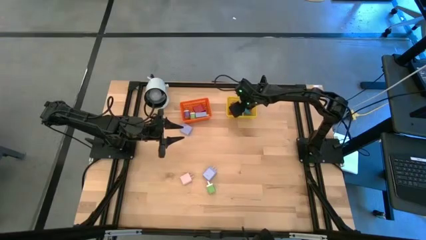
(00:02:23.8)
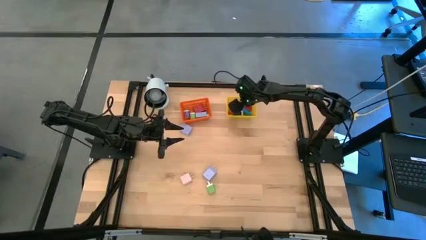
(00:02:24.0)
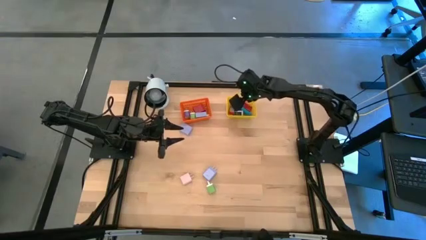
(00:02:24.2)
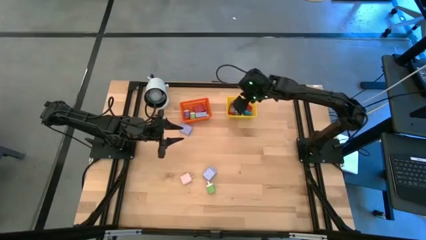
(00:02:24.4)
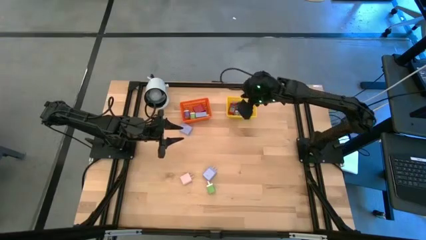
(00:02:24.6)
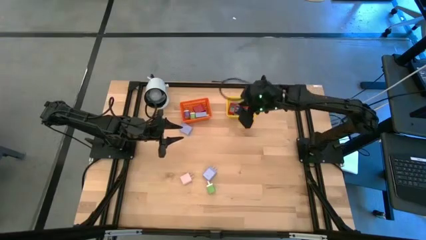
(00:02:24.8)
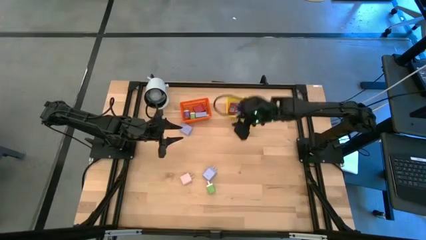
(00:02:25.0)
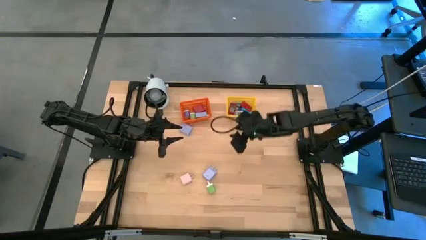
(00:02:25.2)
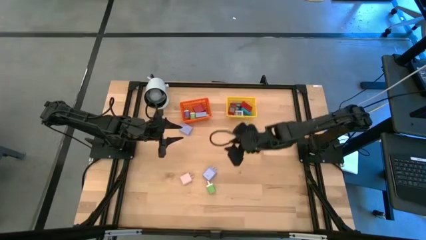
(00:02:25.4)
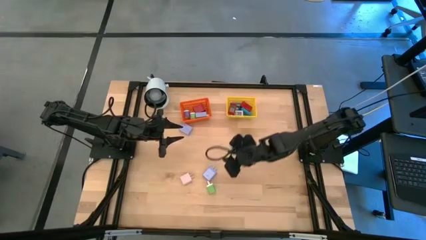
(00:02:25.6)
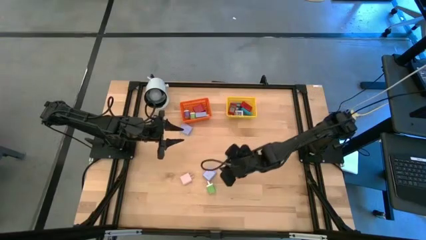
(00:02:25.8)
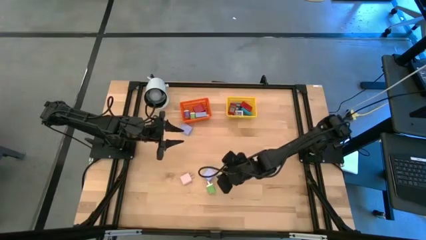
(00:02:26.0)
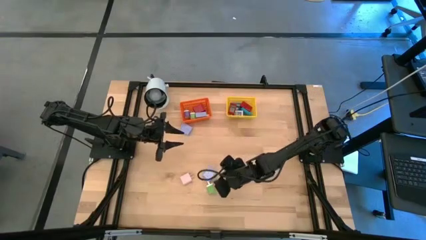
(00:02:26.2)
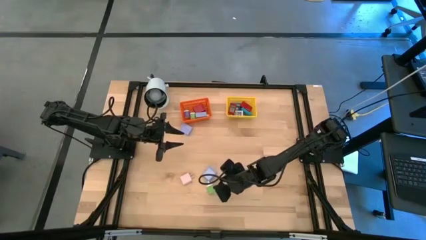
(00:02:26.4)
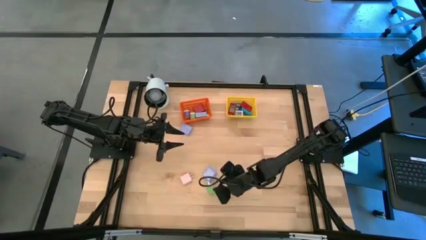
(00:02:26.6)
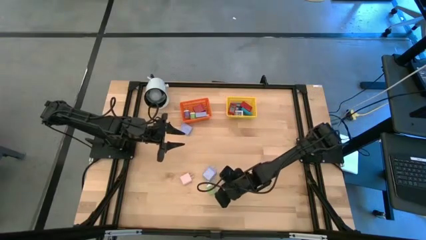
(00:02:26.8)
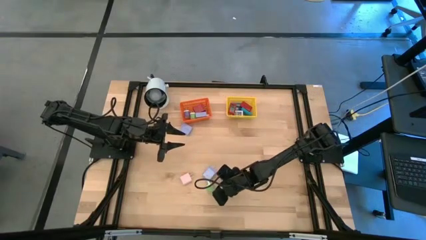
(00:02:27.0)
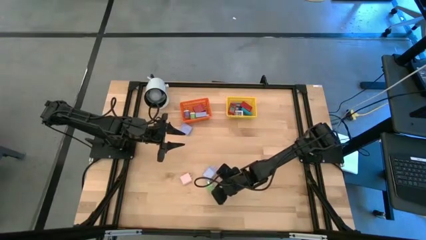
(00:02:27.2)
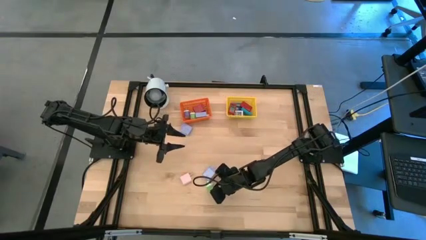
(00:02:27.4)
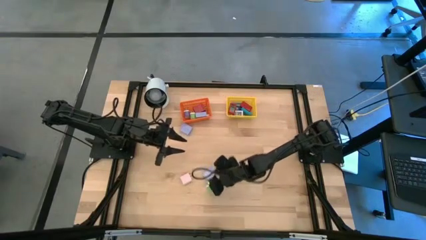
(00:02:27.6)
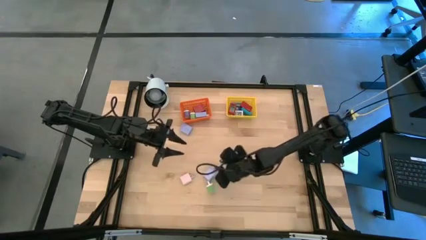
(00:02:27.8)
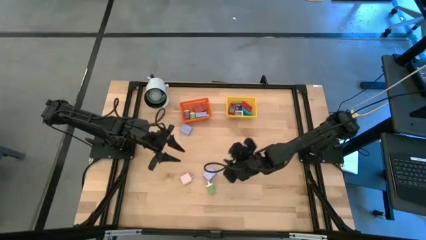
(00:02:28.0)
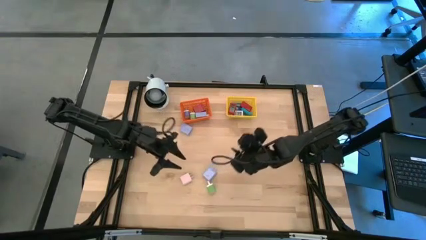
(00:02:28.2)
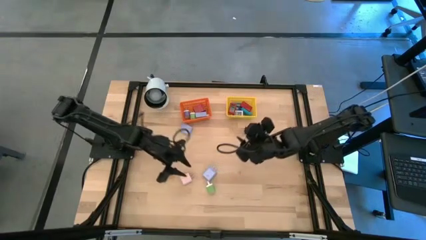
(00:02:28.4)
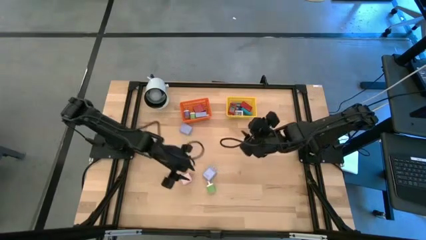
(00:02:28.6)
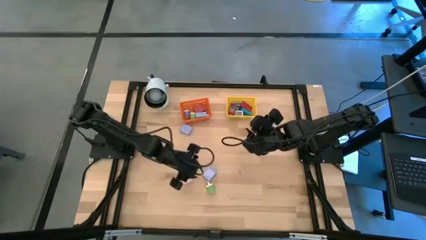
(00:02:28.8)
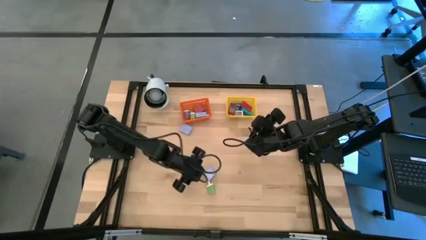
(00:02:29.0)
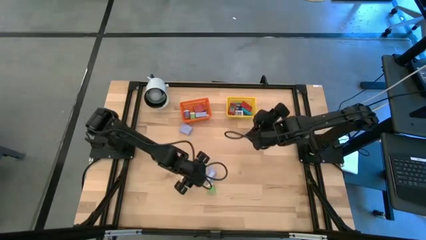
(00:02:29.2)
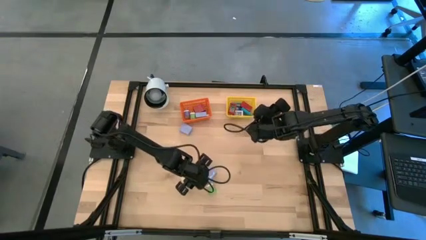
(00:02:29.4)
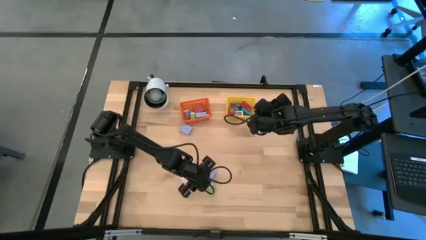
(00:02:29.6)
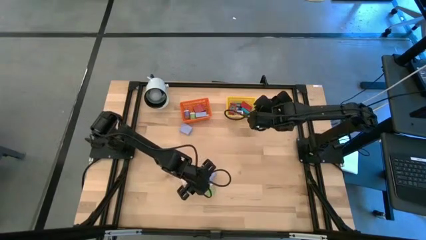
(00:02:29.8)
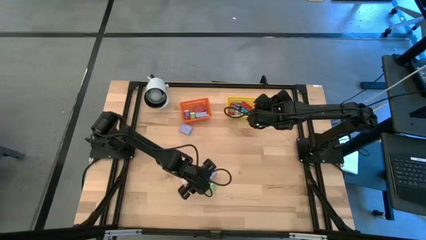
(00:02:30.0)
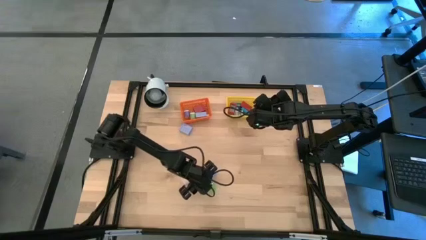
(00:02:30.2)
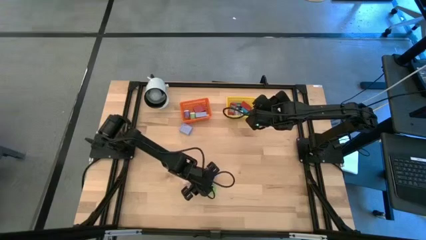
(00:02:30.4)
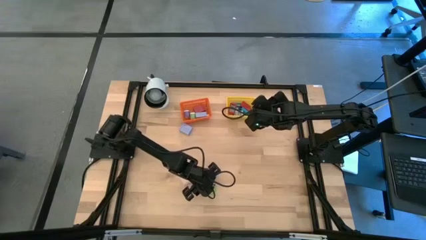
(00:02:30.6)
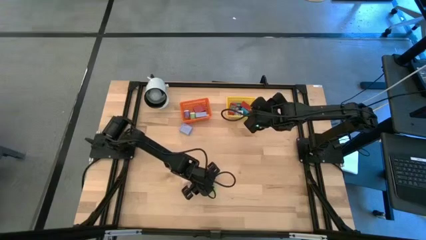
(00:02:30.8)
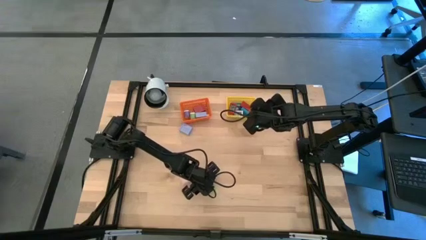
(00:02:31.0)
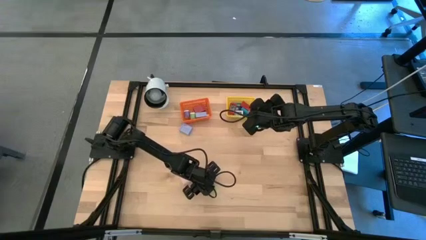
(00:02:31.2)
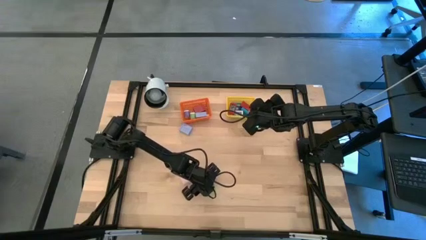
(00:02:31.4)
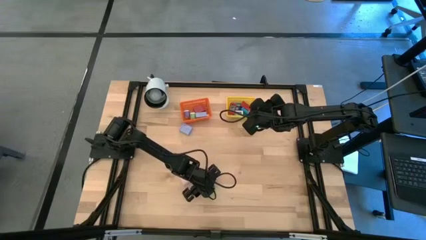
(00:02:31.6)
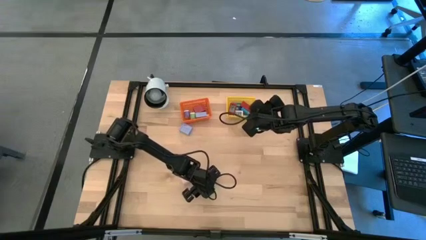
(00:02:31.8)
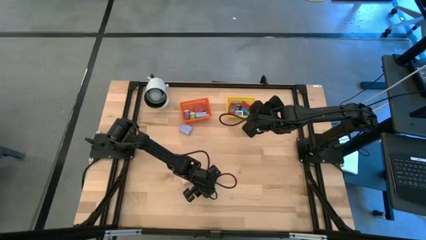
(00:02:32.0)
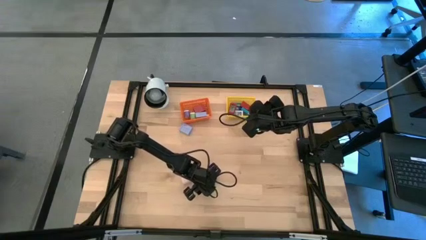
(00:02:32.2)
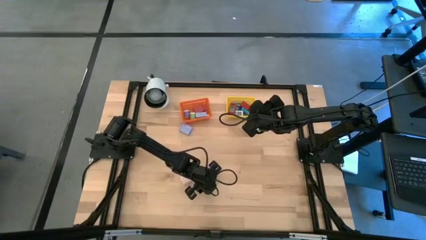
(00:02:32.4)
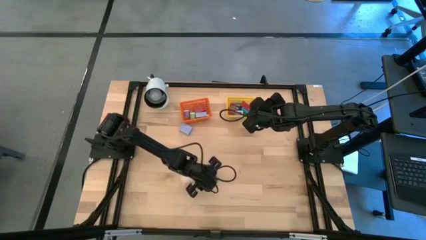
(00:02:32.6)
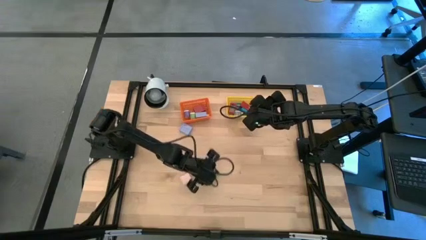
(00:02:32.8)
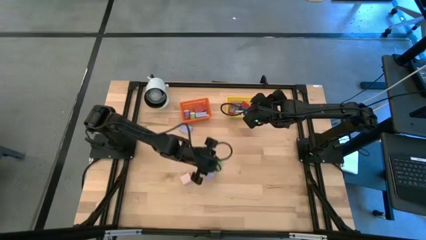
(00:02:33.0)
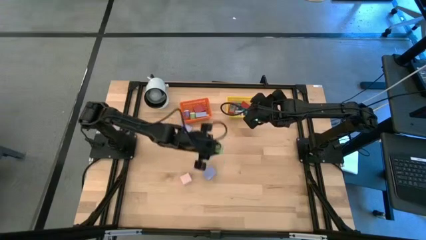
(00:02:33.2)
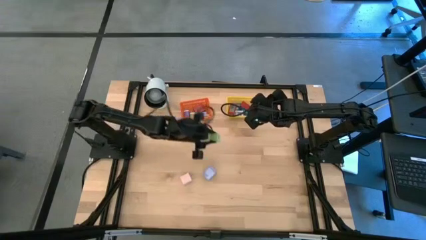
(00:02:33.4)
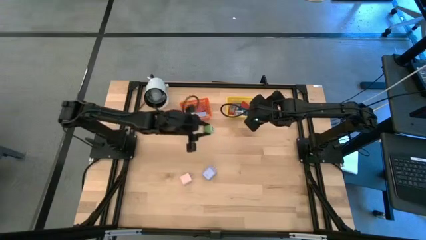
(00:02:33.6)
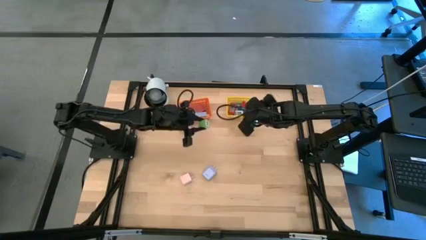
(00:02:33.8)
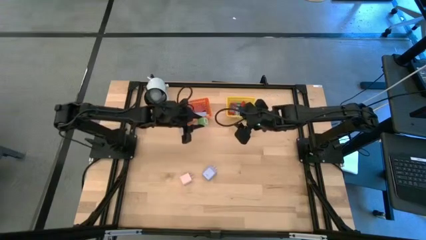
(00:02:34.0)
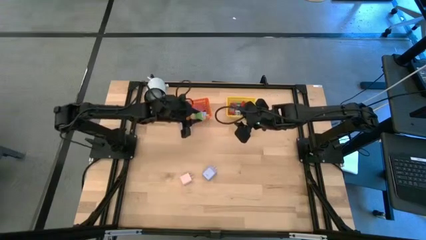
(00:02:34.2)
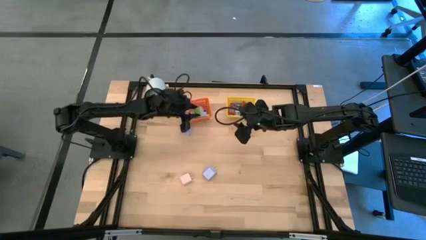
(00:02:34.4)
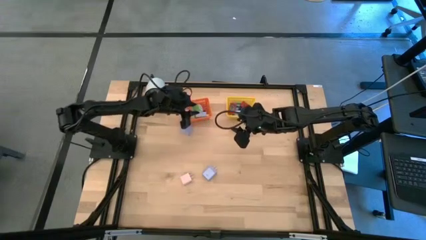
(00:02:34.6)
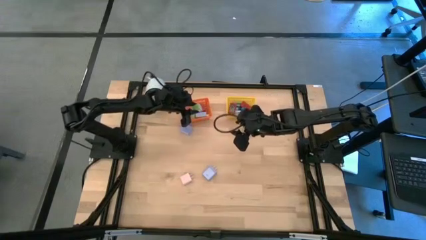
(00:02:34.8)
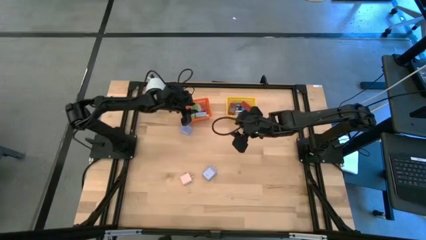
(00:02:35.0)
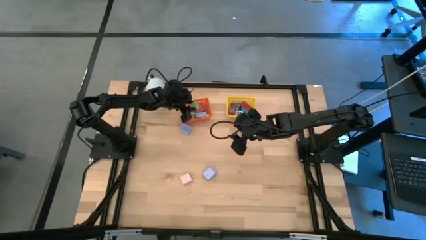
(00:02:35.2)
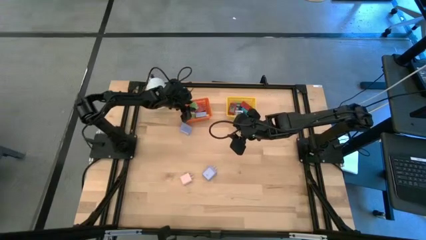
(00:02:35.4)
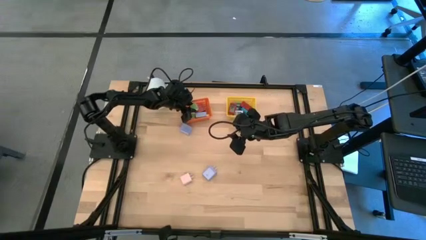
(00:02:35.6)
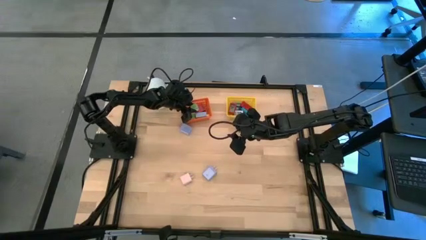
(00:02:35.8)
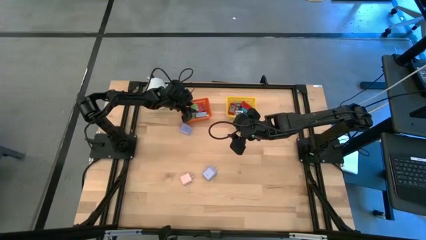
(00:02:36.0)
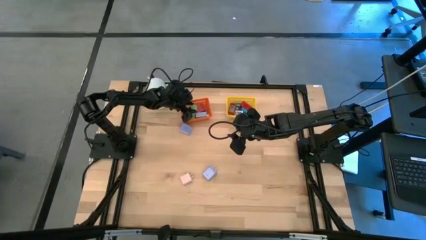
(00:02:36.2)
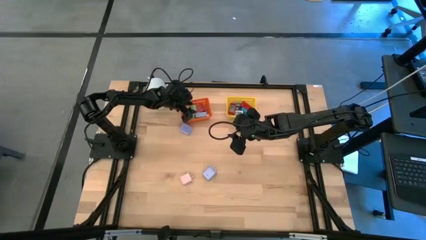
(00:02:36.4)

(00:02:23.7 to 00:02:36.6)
Task: Pick & Place Office items
Put the green charger adapter into the orange bin

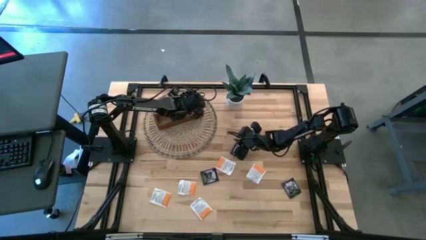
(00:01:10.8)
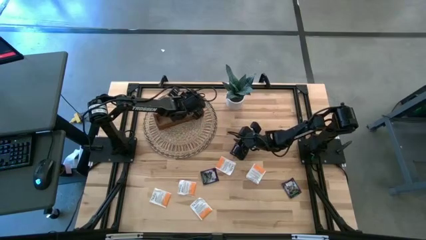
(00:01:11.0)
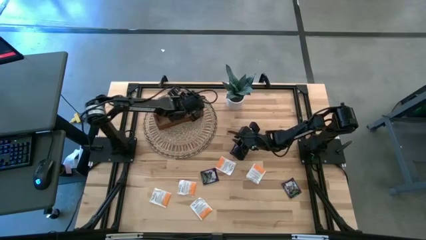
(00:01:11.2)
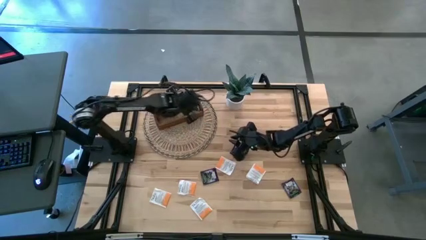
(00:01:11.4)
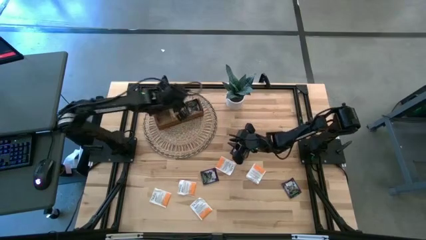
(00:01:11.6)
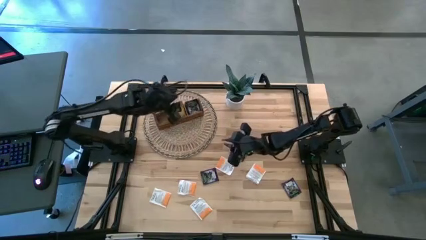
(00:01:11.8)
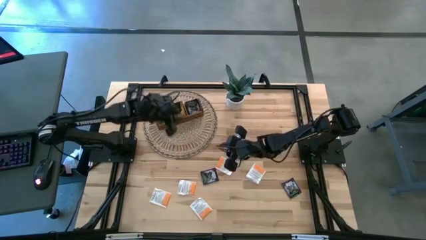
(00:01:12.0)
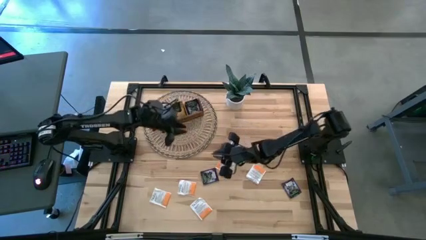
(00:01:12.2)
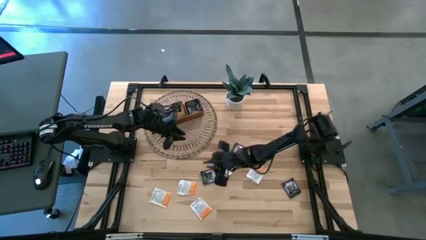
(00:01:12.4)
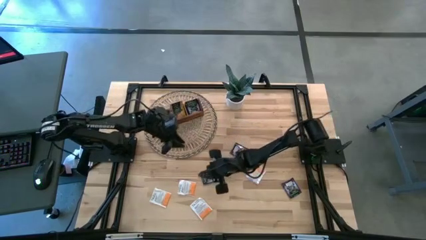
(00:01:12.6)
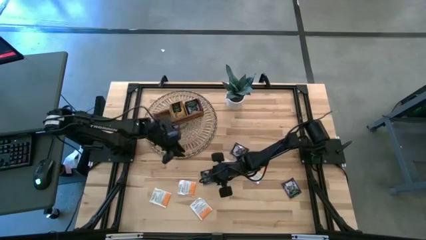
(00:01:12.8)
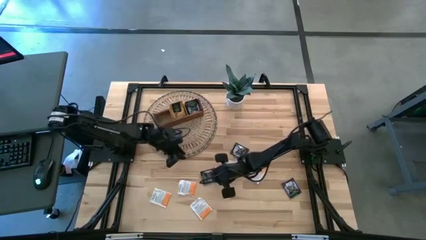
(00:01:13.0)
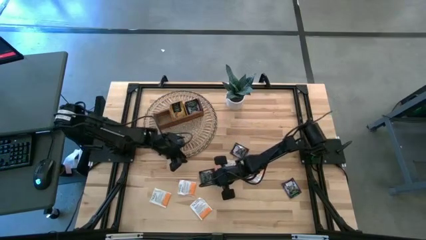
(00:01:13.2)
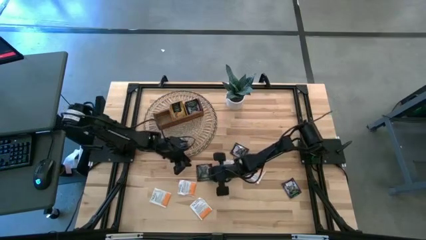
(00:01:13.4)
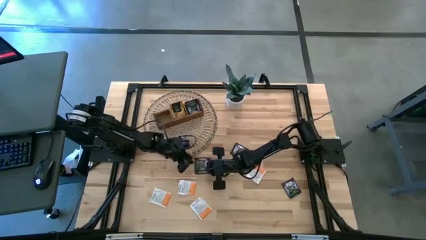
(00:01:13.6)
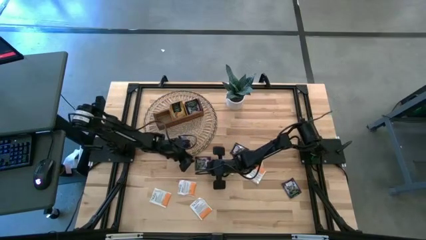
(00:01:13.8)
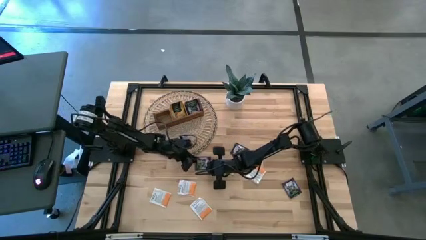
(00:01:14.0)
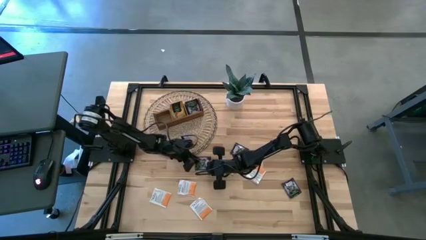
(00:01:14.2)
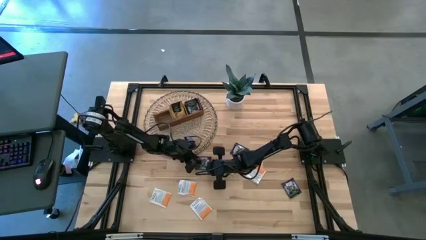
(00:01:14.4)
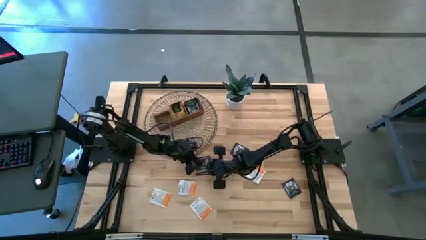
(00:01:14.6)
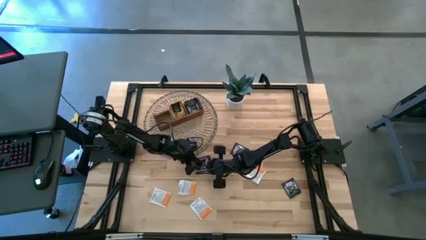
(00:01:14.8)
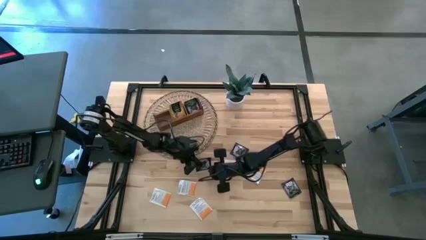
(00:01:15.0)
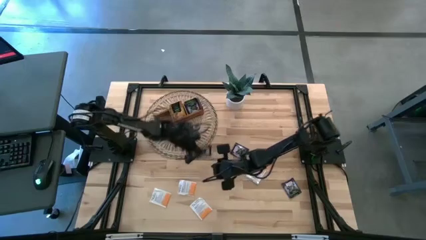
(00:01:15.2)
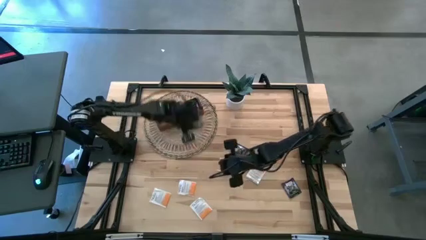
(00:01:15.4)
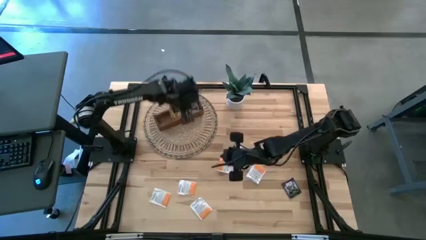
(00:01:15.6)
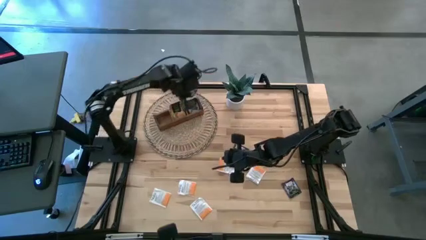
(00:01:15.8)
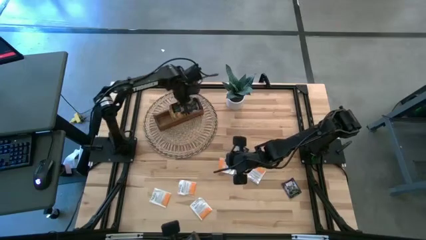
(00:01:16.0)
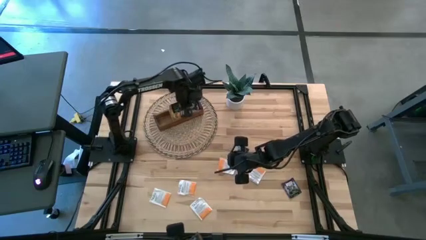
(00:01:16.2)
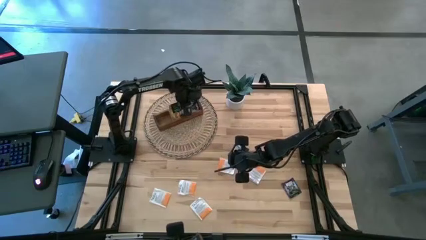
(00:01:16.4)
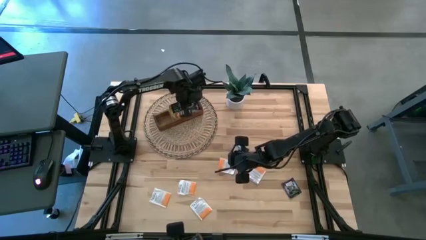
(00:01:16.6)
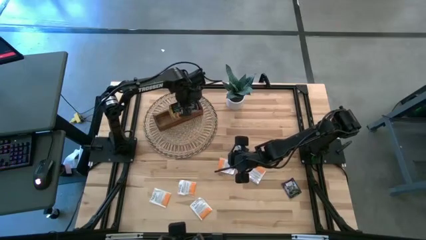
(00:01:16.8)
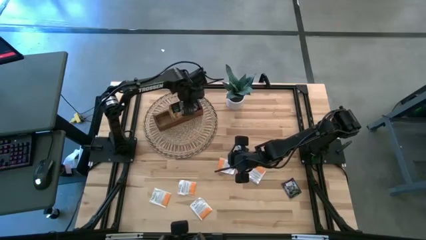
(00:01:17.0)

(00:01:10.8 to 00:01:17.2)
Task: Pick & Place Tea
Put the black tea bag into the right section of the wooden organizer
